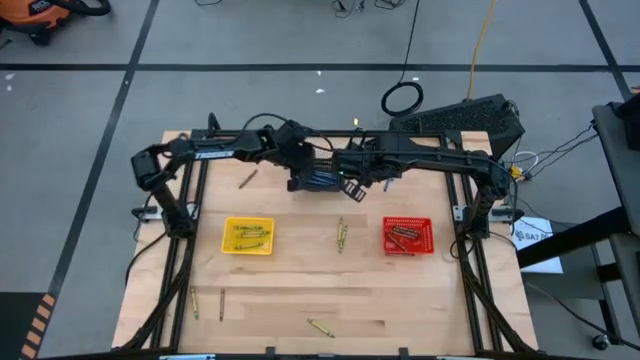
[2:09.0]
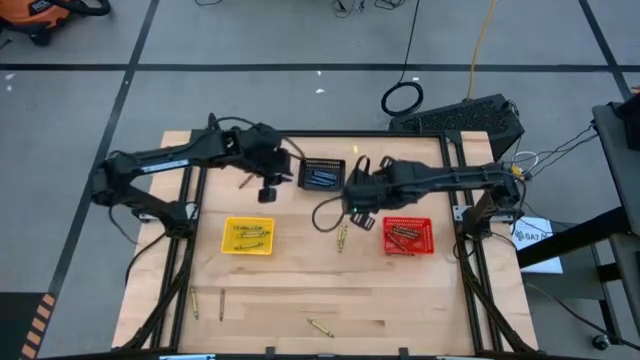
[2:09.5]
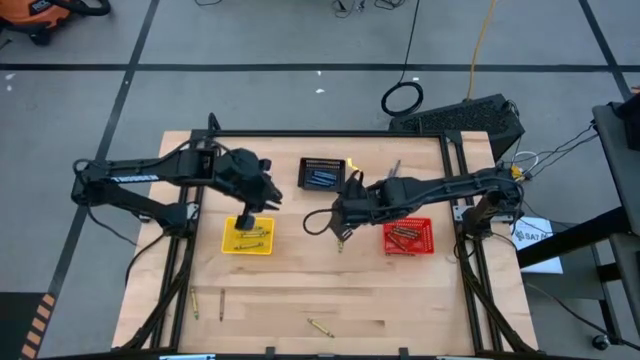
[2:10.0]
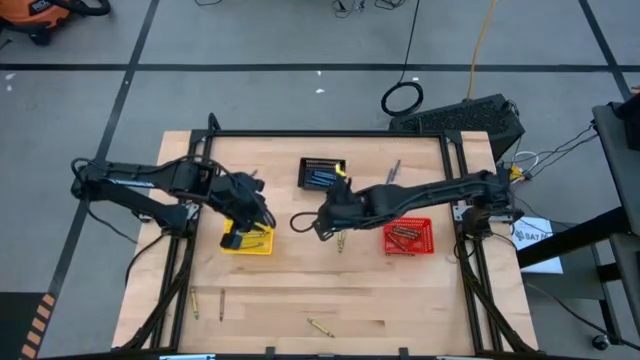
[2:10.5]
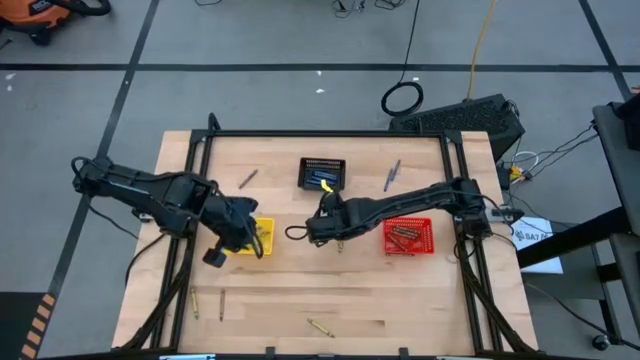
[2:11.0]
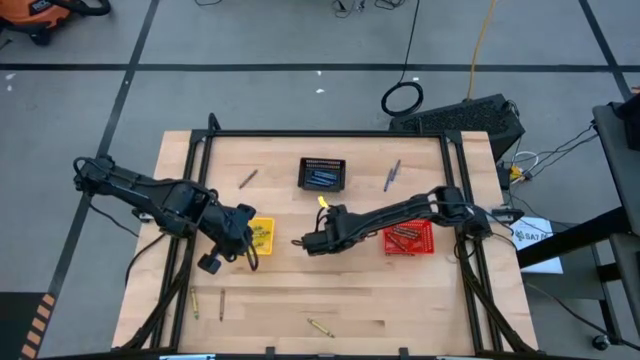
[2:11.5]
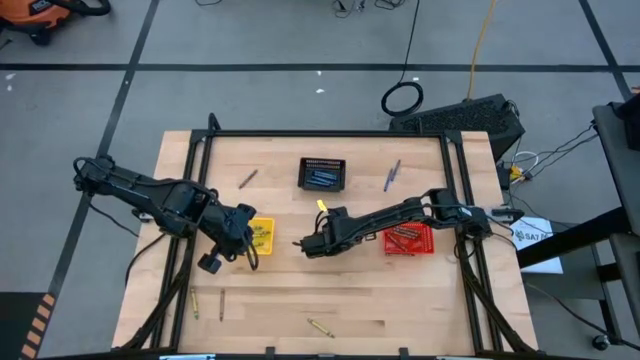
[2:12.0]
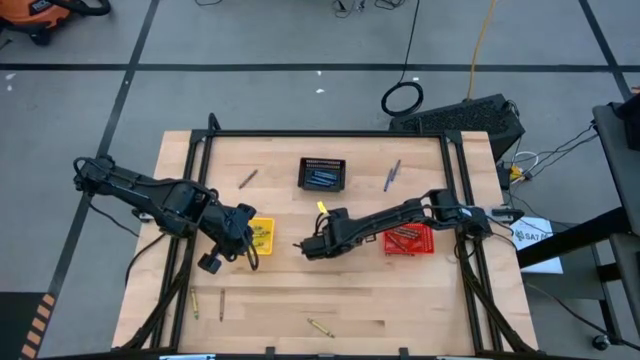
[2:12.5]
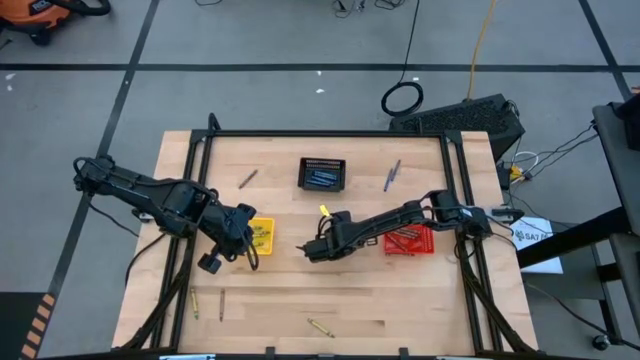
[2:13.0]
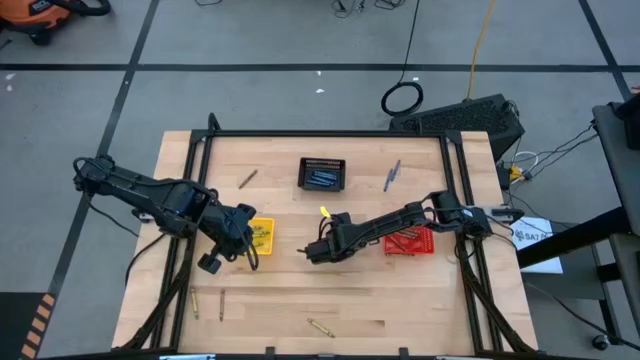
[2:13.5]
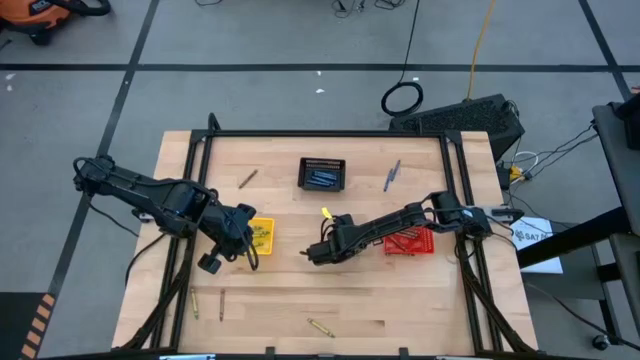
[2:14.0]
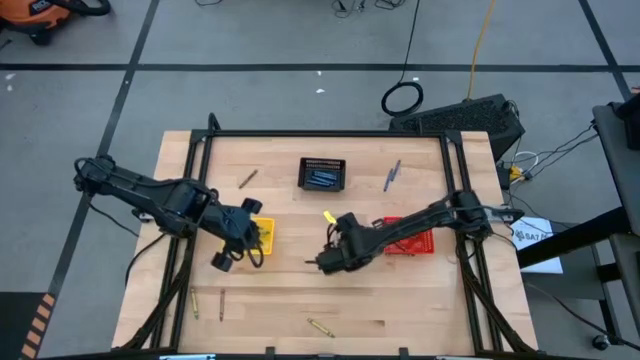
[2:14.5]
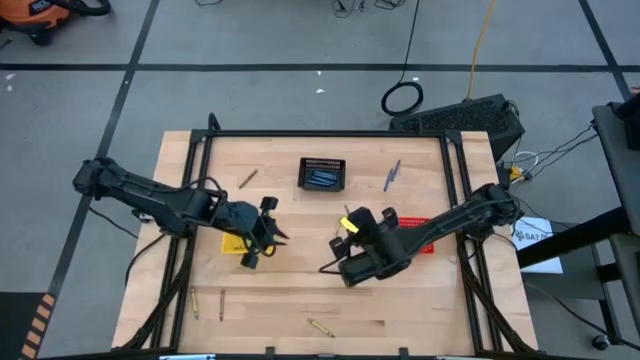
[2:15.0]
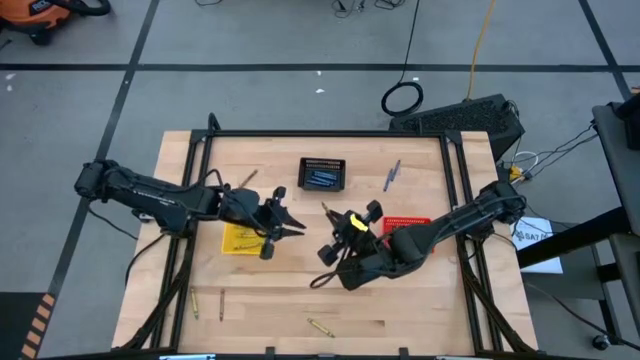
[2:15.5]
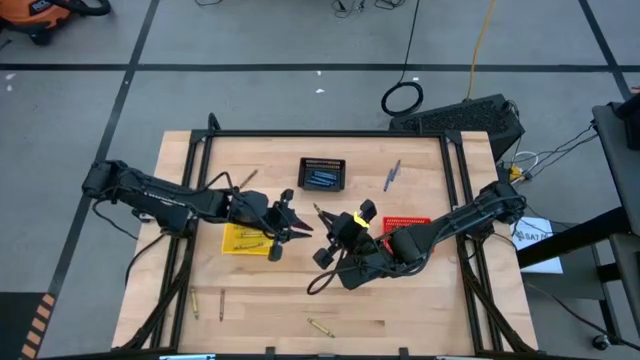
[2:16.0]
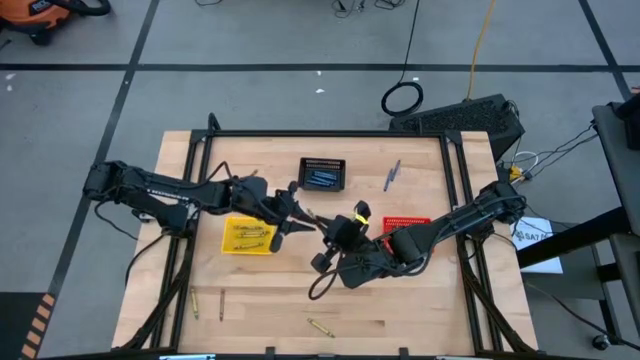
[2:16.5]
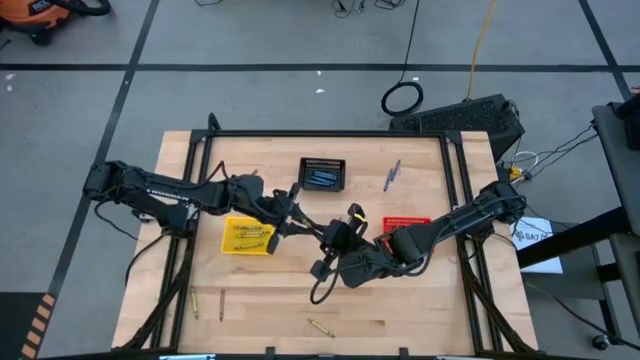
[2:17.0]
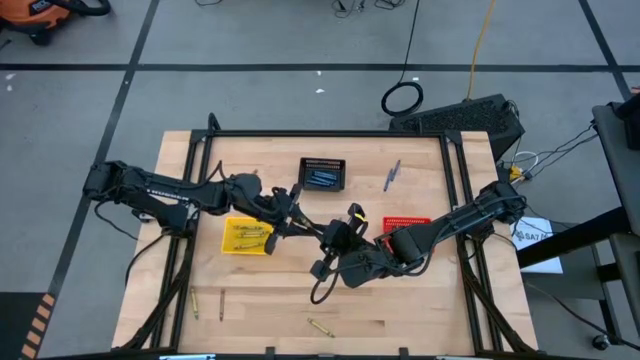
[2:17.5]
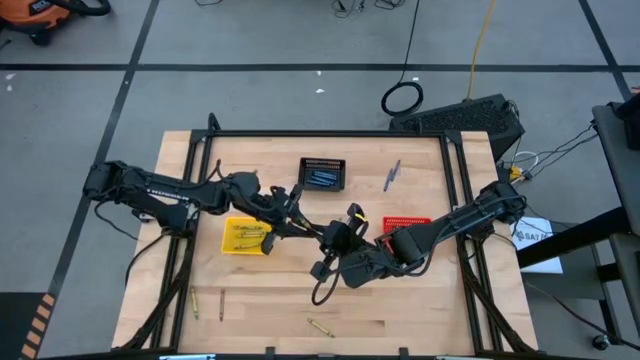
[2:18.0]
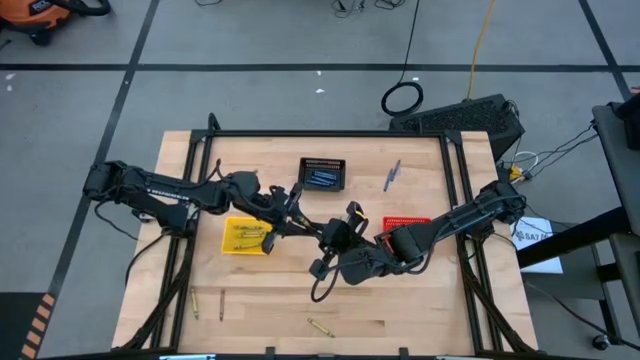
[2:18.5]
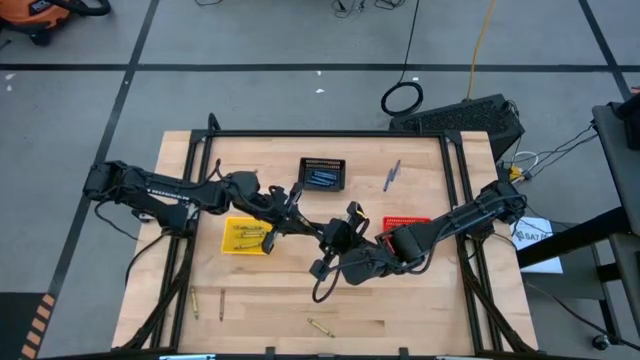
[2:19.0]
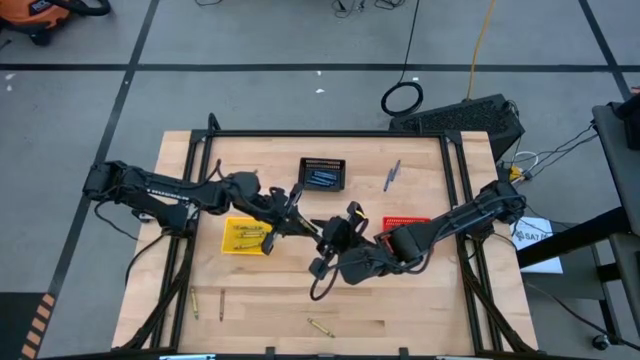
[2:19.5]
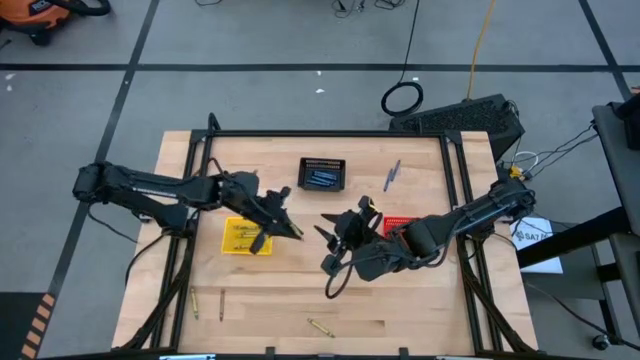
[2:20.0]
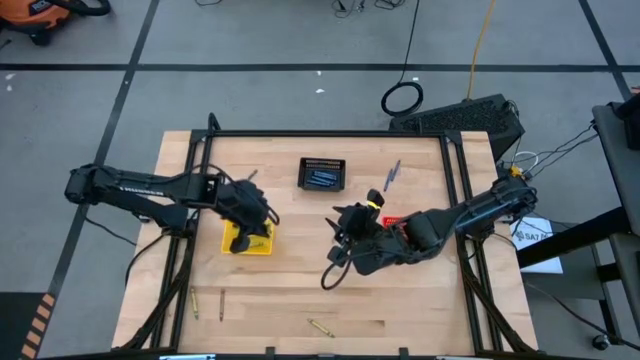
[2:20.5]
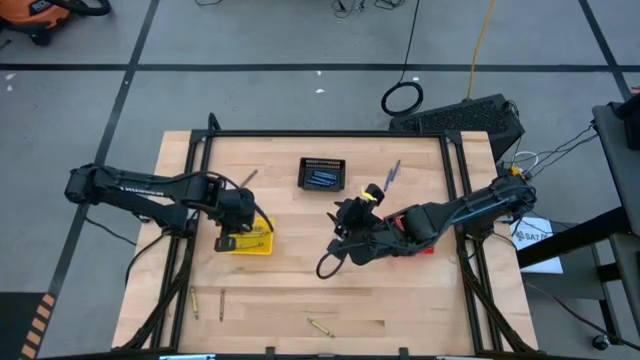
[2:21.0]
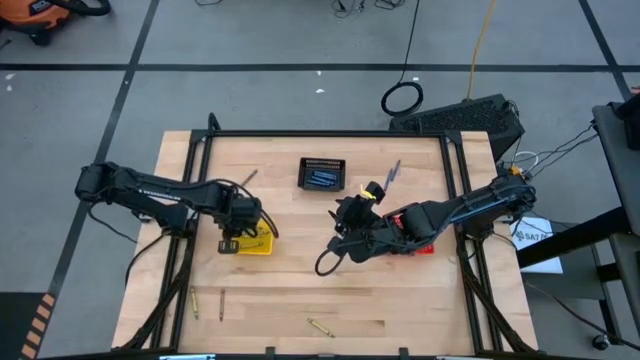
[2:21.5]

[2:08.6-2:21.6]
Task: Sort crayons
Put the green crayon into the yellow bin

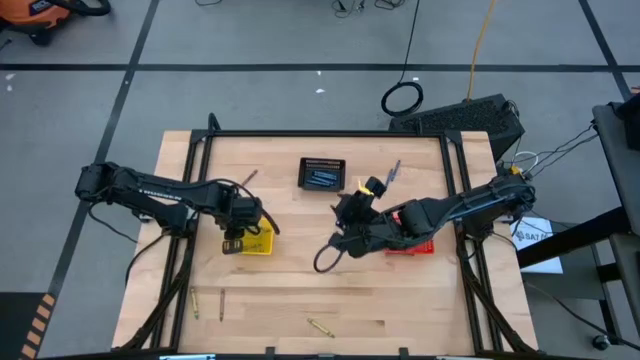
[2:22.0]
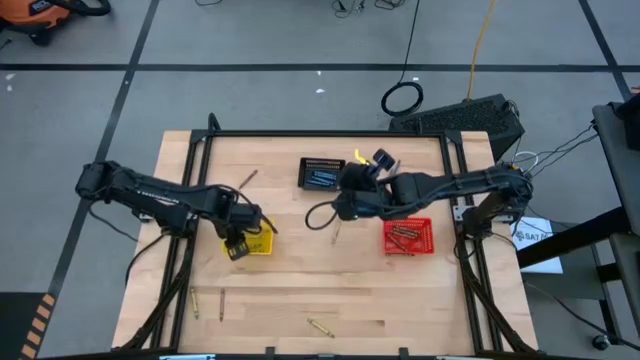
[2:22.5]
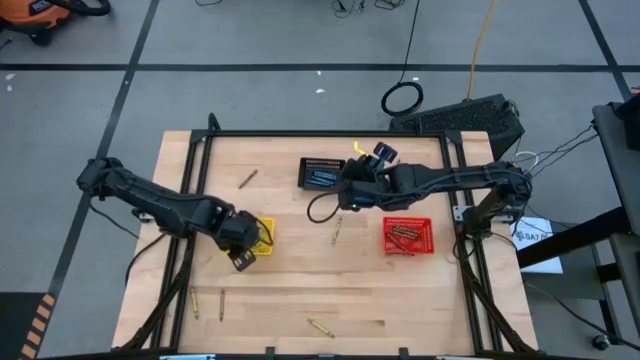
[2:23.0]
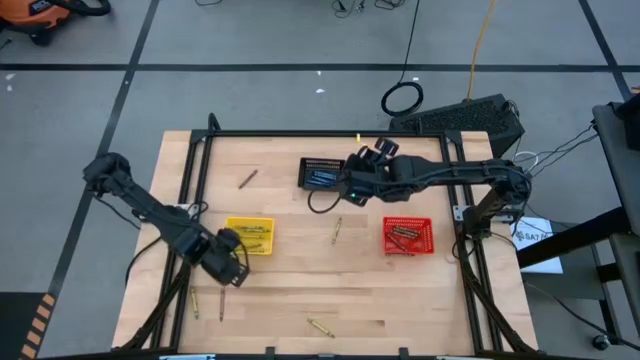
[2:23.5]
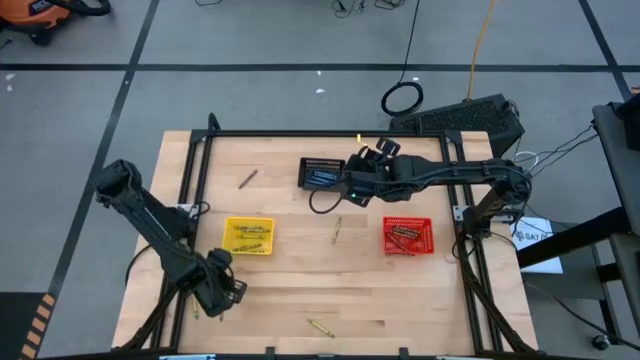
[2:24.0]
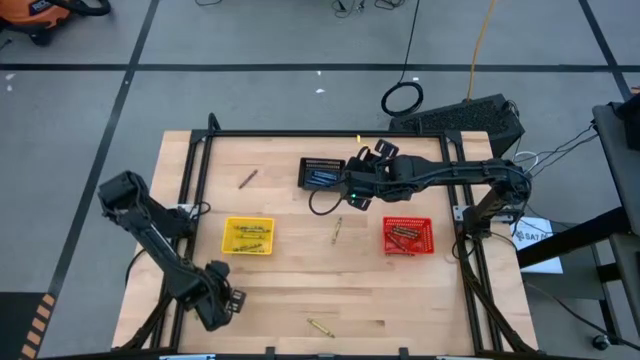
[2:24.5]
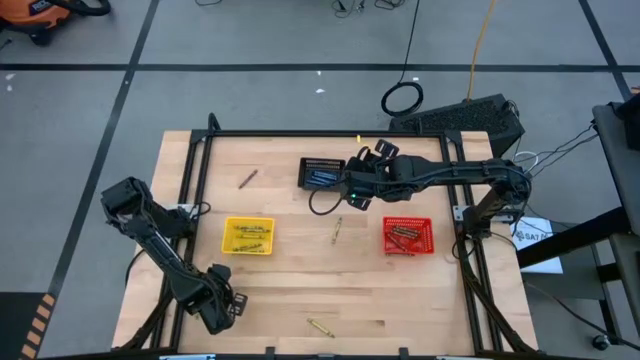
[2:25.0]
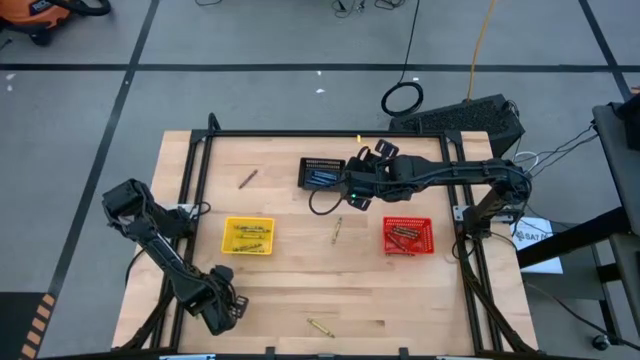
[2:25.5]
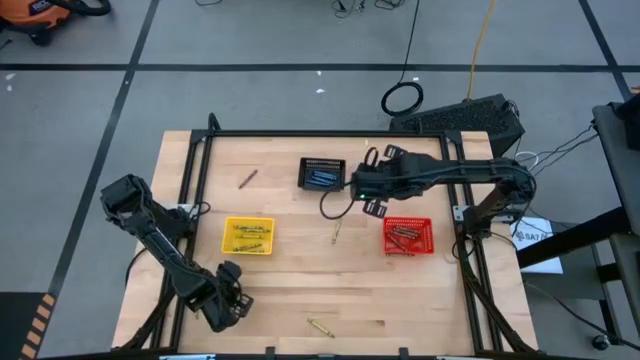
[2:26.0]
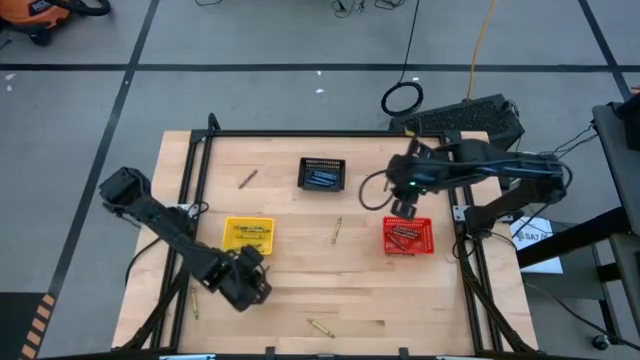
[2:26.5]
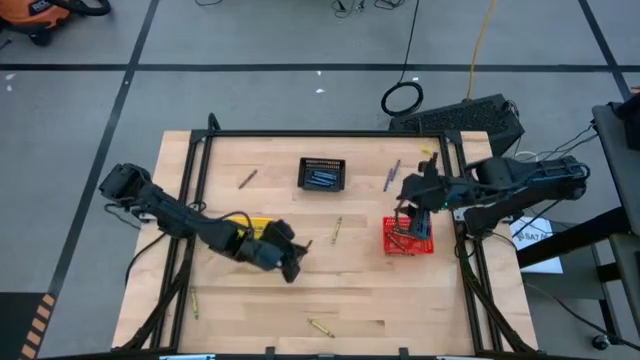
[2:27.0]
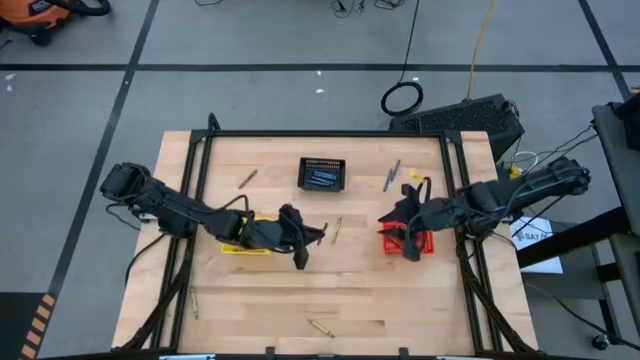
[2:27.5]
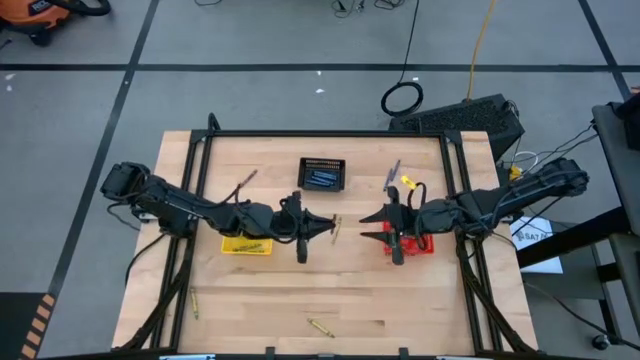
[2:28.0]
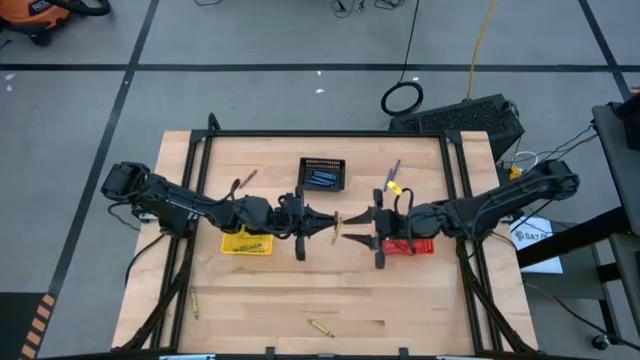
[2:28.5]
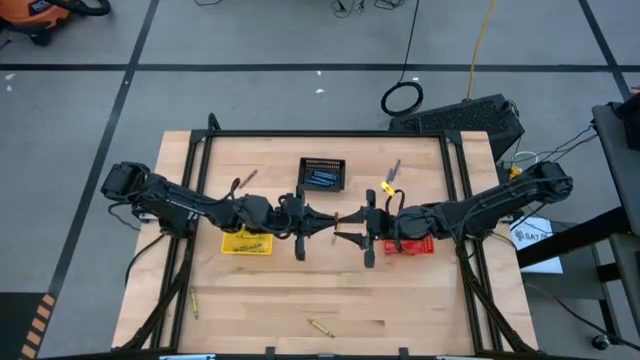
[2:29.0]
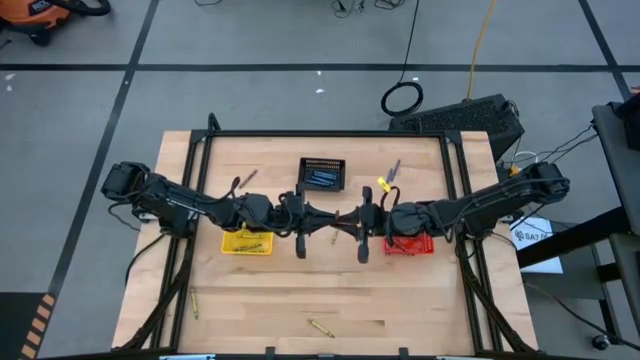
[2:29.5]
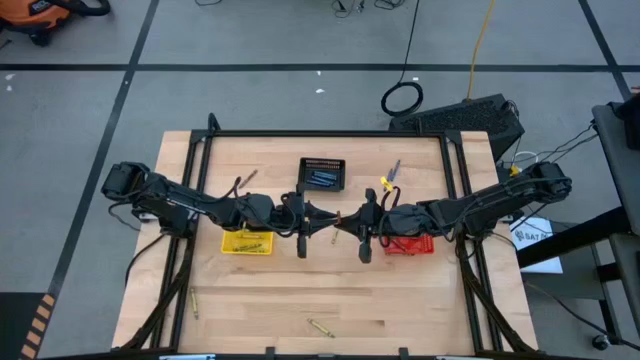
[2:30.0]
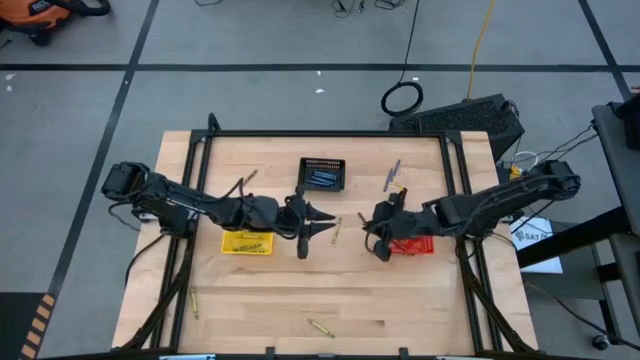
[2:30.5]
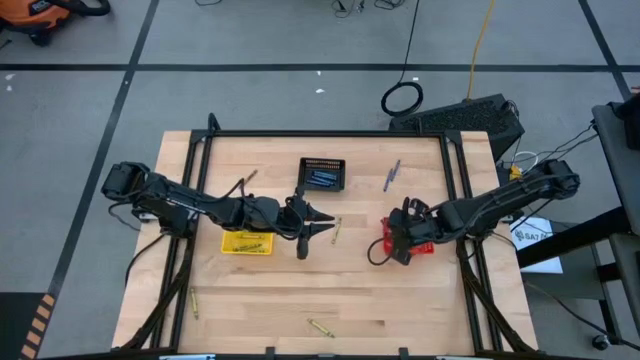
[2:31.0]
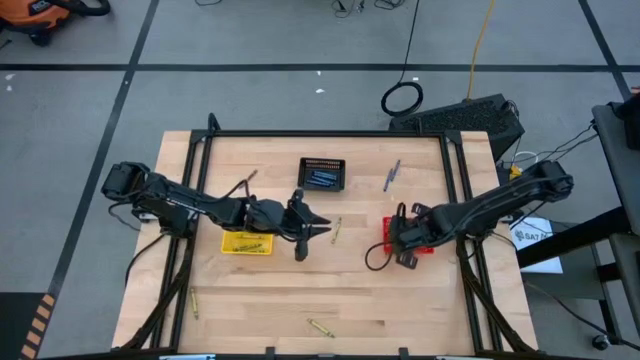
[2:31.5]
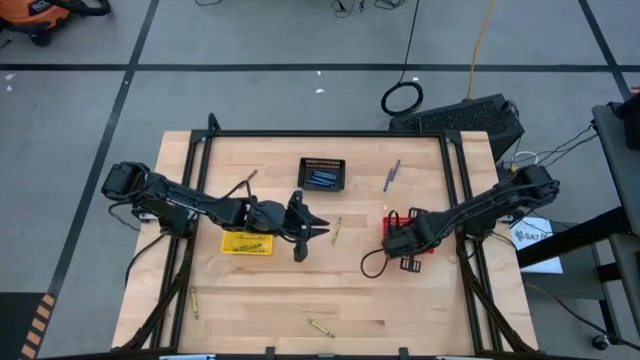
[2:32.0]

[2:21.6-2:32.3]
Put the brown crayon into the red bin
